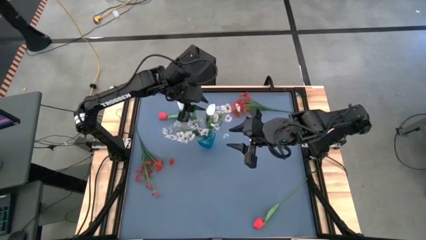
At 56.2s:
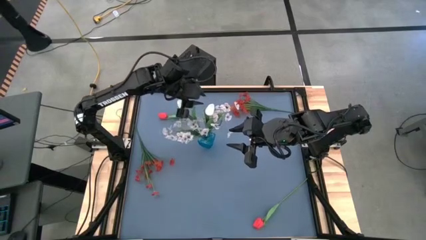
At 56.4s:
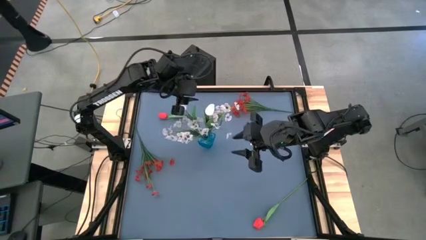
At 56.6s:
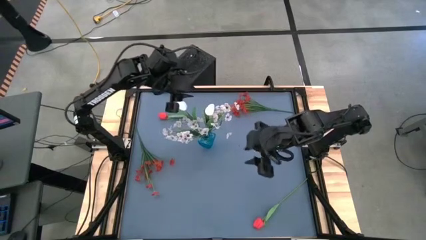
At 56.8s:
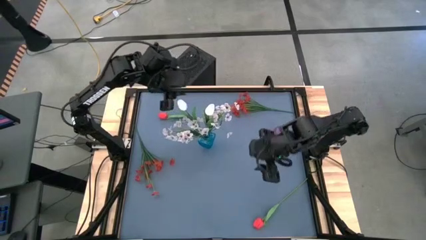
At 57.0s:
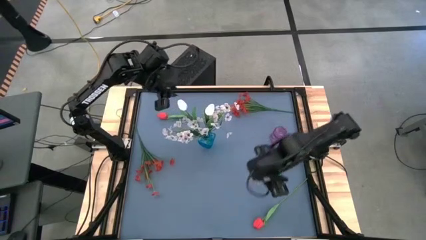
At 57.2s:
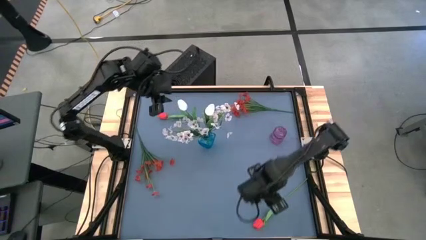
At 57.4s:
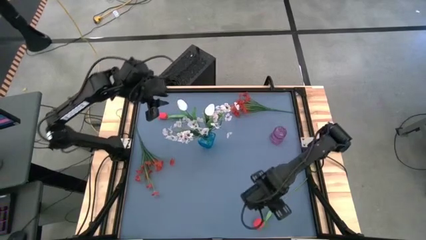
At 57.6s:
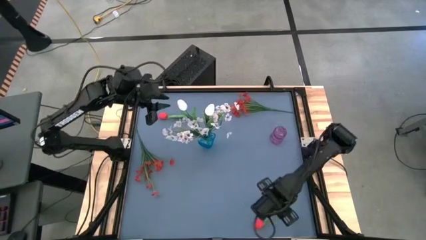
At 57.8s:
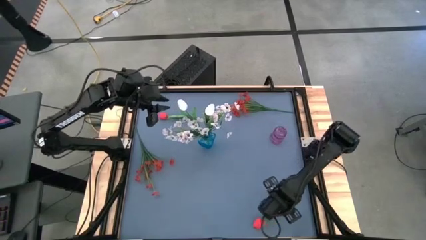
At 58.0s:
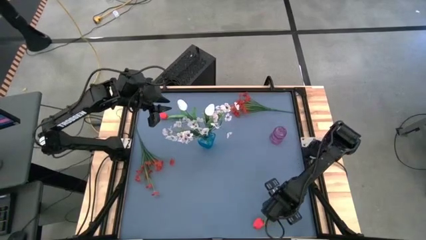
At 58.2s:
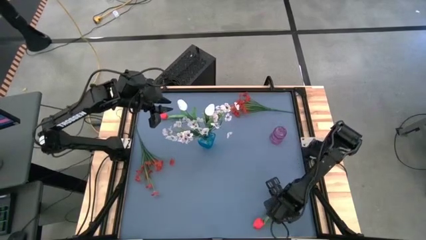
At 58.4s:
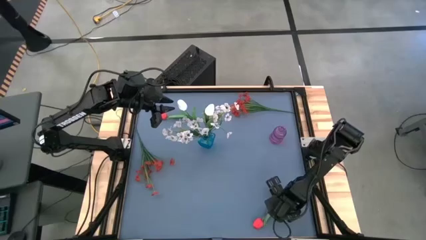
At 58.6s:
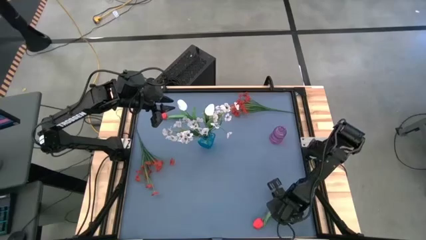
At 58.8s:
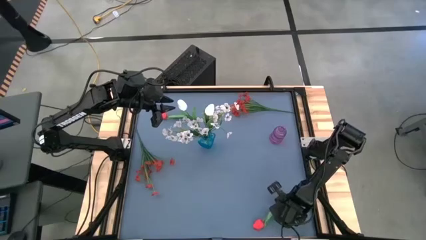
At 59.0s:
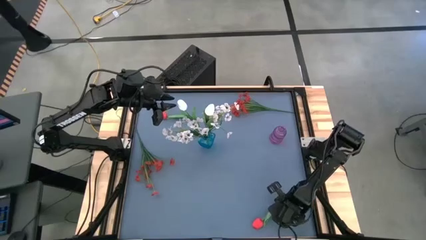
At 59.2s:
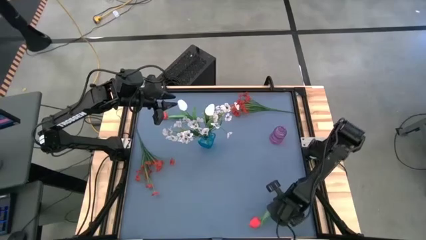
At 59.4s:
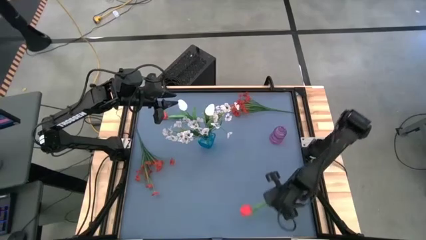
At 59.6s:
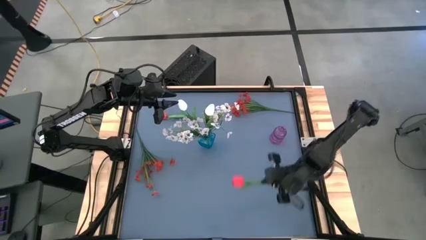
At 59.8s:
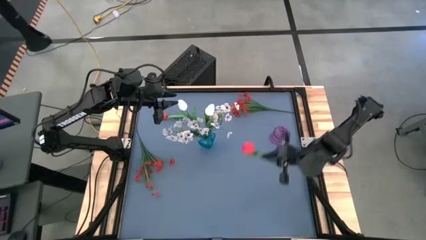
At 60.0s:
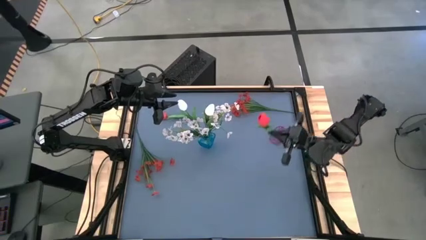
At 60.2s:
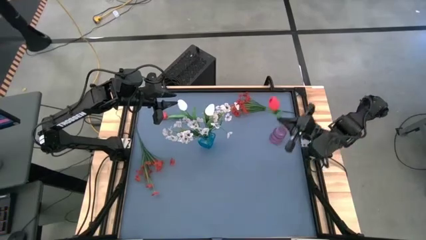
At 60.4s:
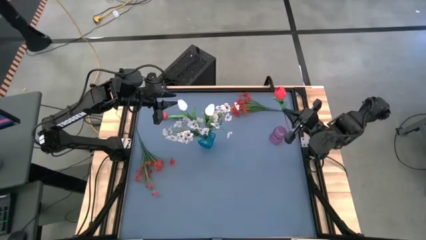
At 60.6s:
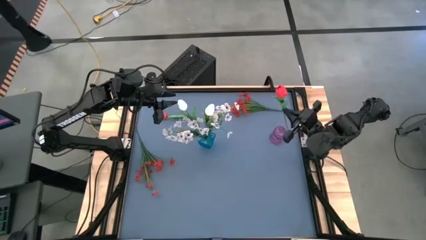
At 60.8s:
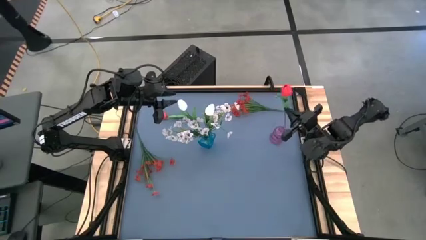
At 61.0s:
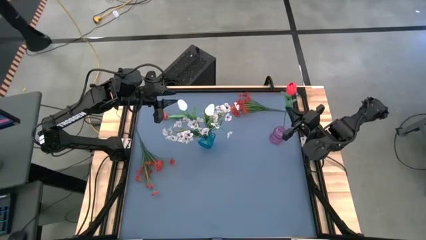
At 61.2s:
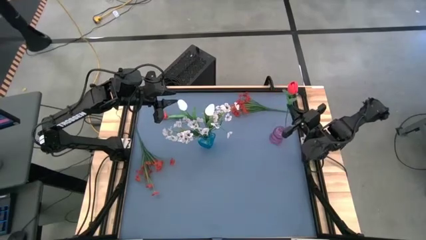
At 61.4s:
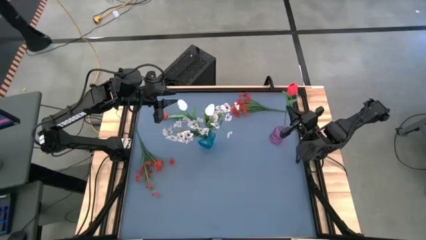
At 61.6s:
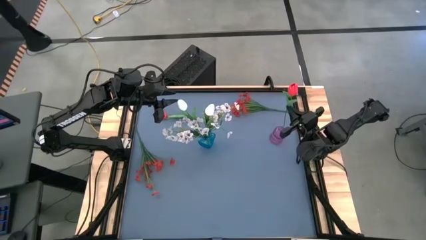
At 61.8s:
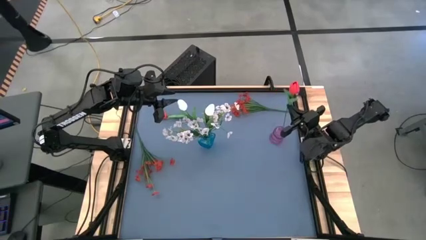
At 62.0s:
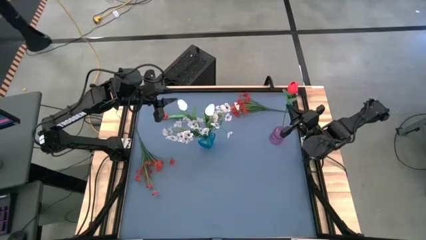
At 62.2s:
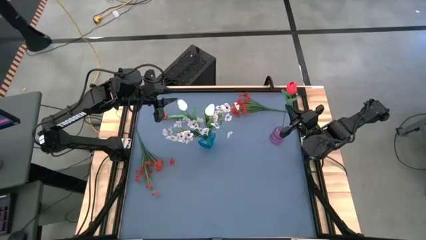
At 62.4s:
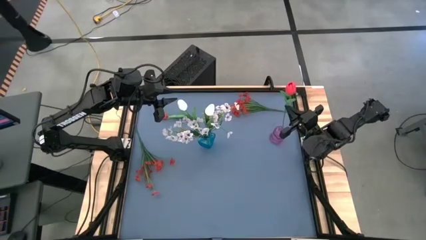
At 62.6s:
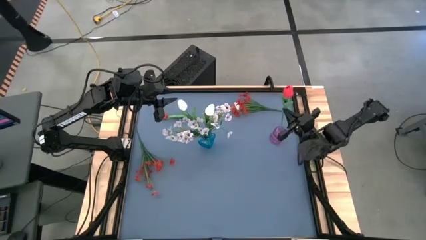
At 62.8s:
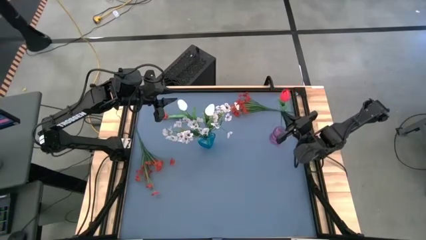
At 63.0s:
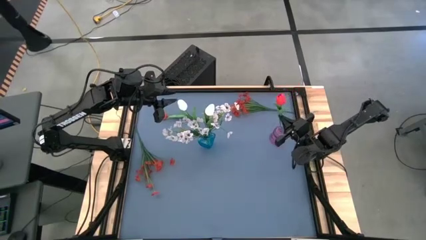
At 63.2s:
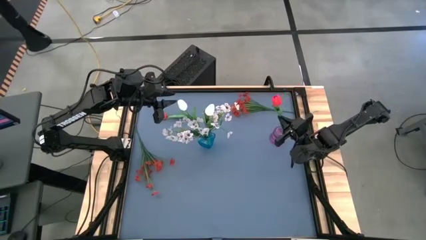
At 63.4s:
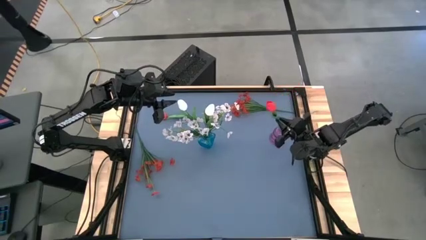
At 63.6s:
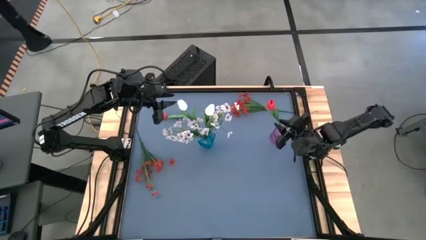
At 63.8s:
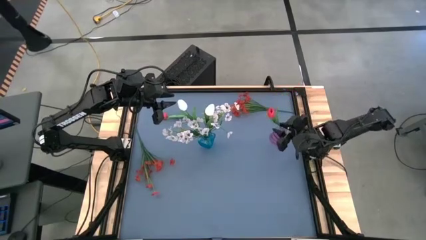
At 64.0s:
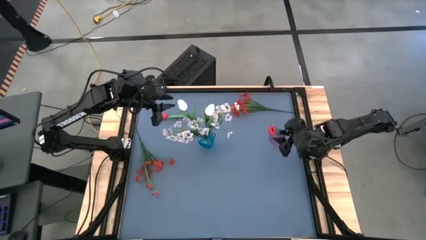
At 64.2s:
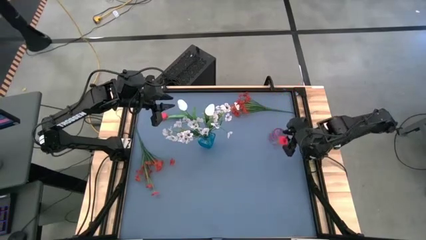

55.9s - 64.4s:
Task: Sort flowers into vase by color
Put the bottom red flower into the violet vase

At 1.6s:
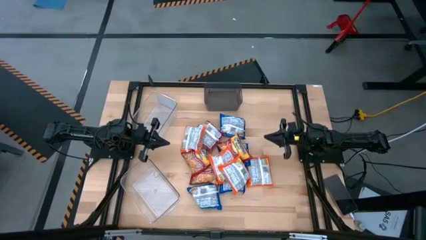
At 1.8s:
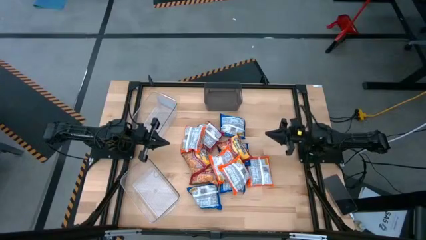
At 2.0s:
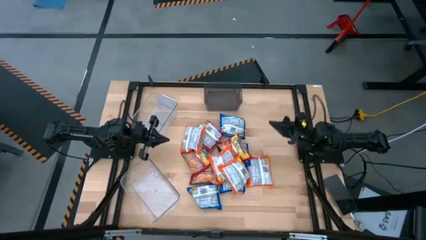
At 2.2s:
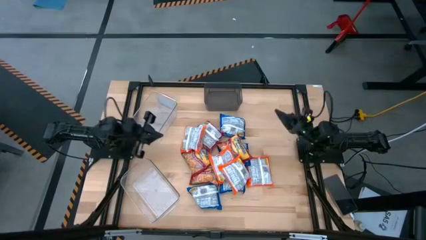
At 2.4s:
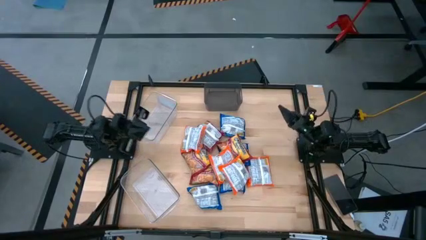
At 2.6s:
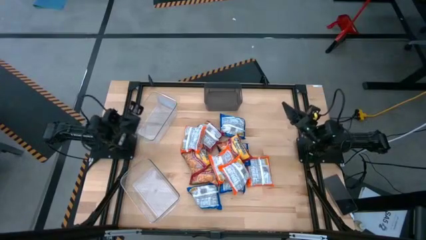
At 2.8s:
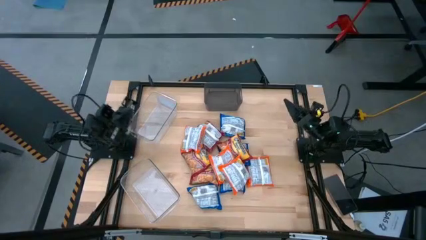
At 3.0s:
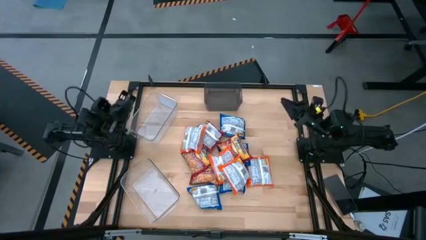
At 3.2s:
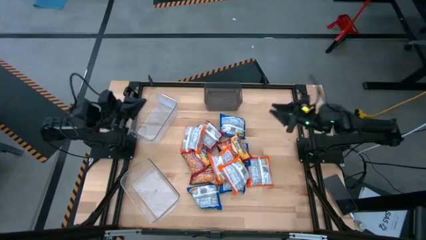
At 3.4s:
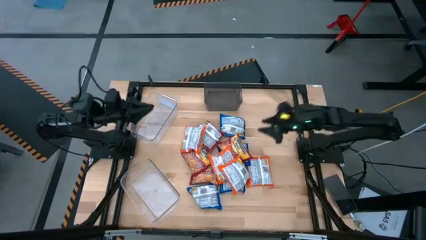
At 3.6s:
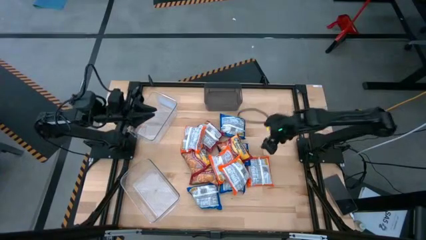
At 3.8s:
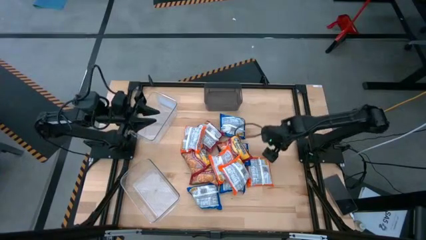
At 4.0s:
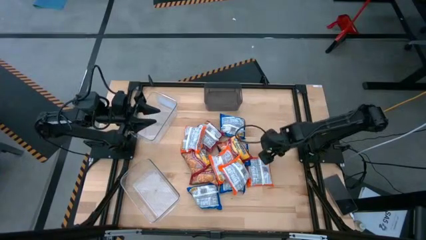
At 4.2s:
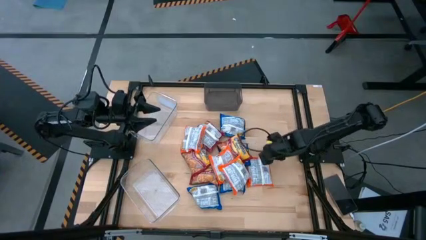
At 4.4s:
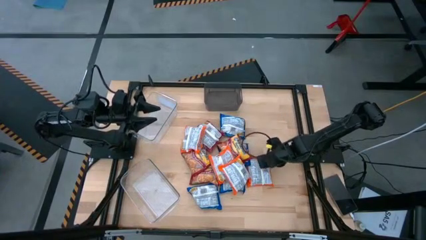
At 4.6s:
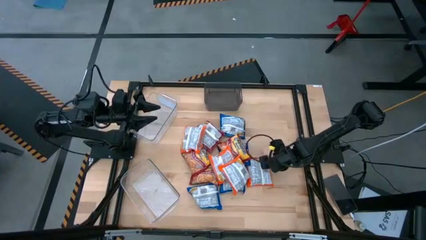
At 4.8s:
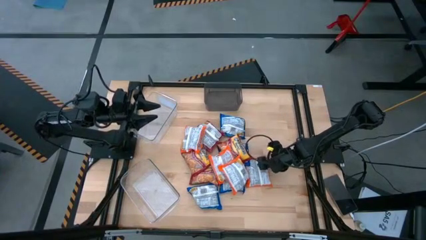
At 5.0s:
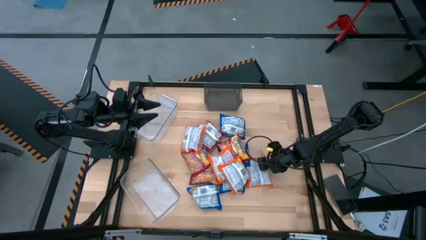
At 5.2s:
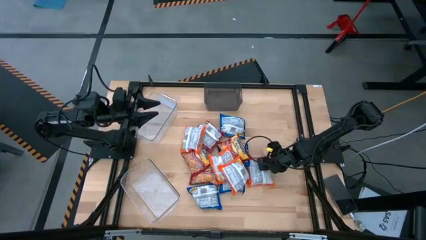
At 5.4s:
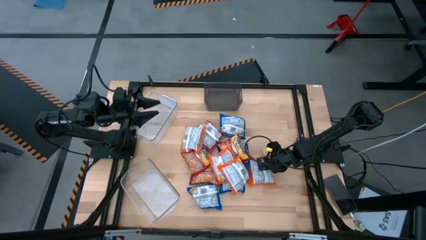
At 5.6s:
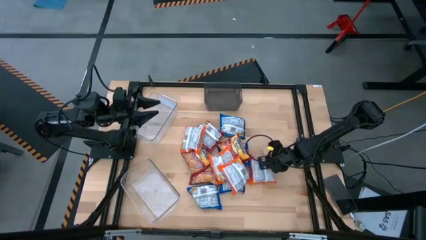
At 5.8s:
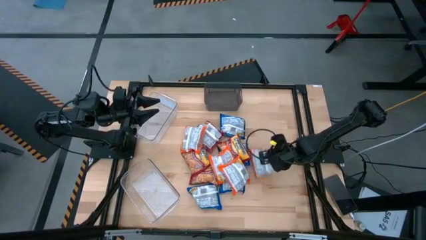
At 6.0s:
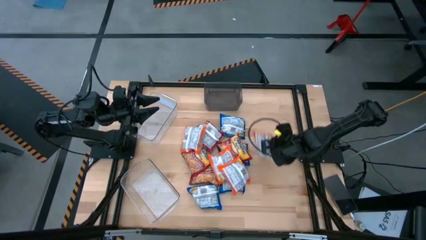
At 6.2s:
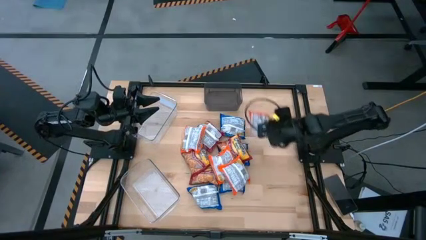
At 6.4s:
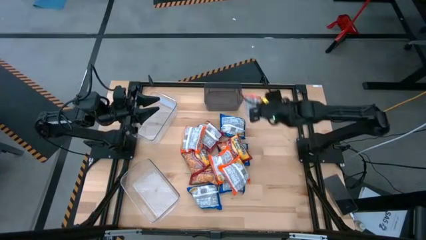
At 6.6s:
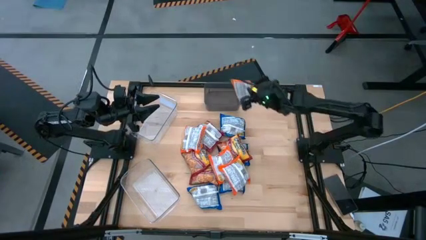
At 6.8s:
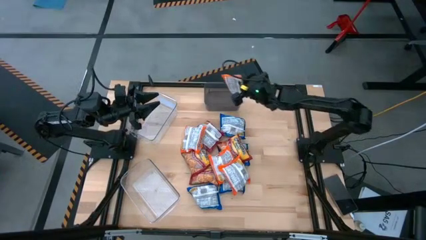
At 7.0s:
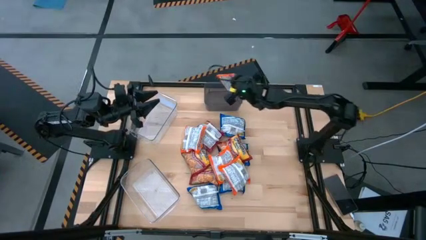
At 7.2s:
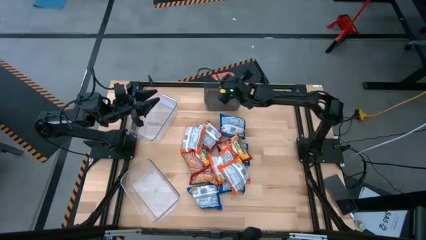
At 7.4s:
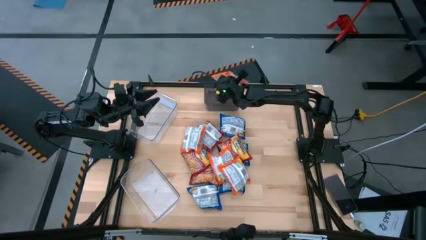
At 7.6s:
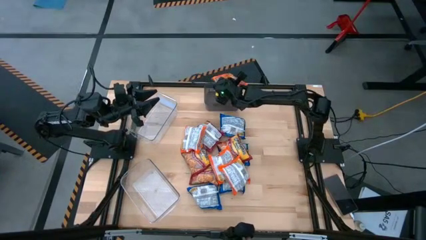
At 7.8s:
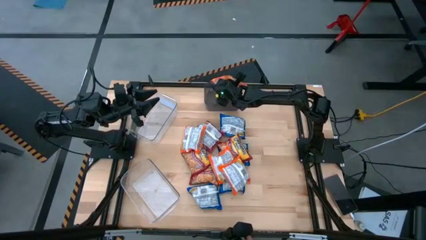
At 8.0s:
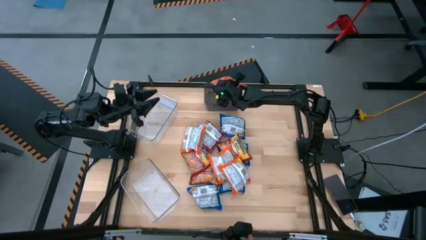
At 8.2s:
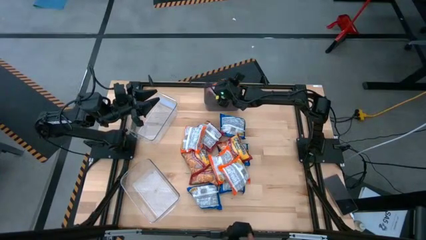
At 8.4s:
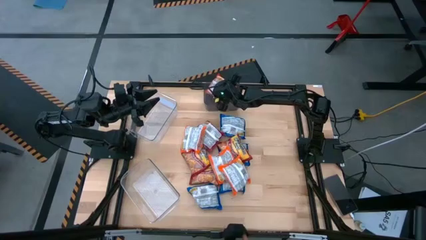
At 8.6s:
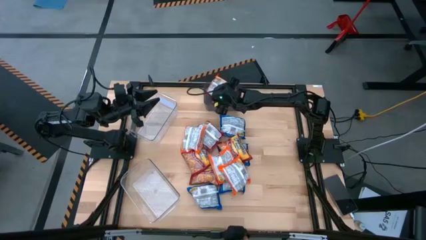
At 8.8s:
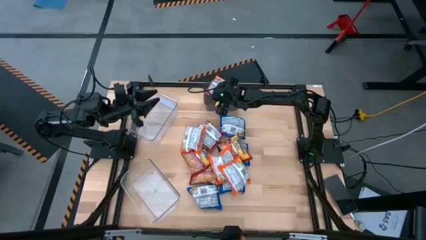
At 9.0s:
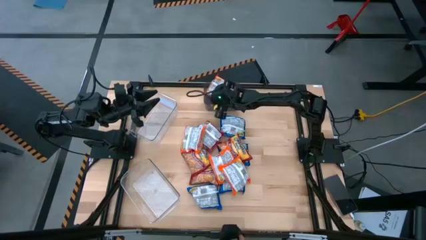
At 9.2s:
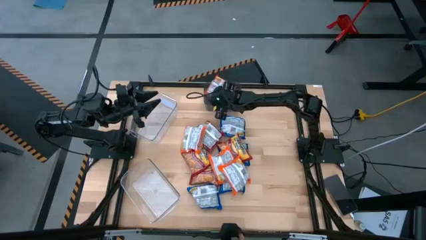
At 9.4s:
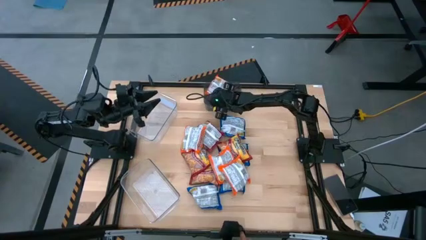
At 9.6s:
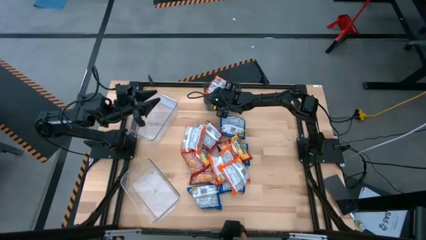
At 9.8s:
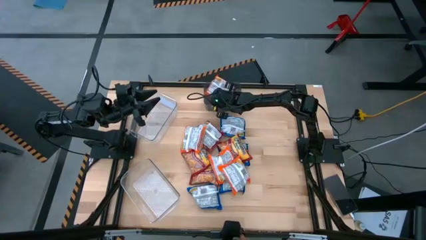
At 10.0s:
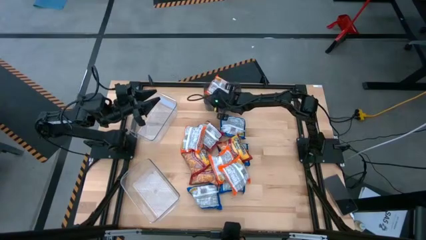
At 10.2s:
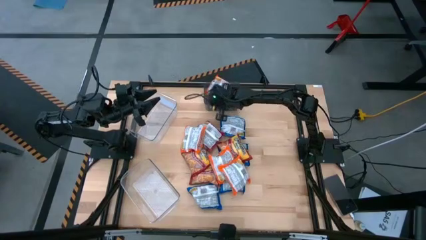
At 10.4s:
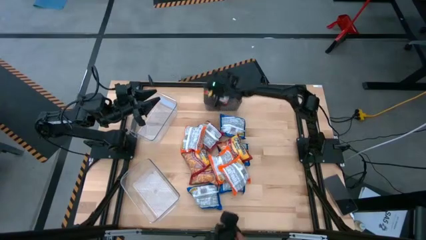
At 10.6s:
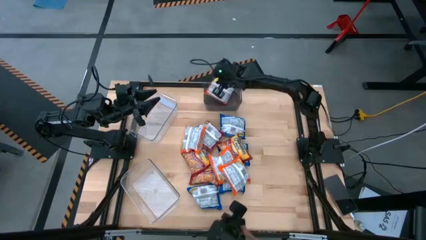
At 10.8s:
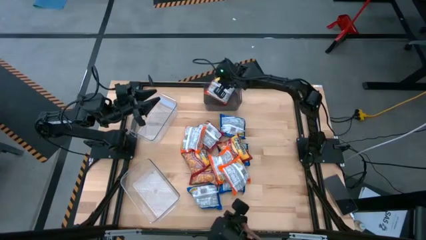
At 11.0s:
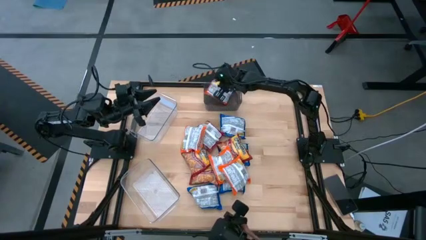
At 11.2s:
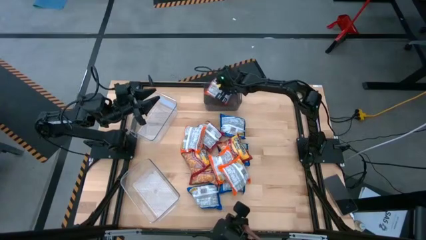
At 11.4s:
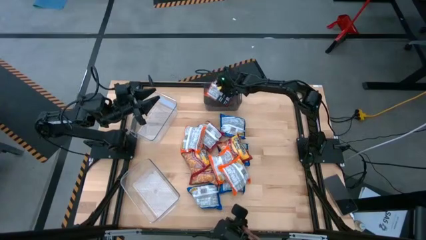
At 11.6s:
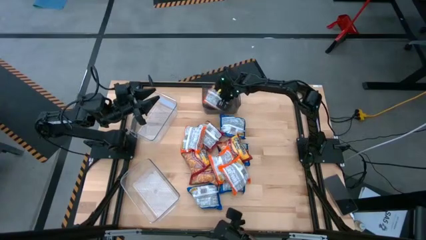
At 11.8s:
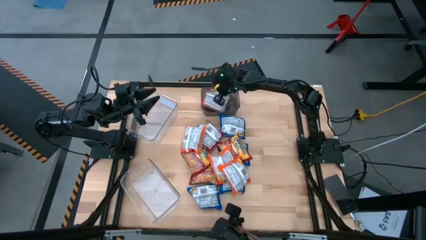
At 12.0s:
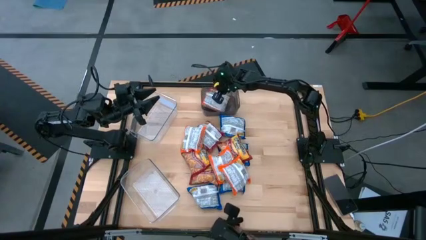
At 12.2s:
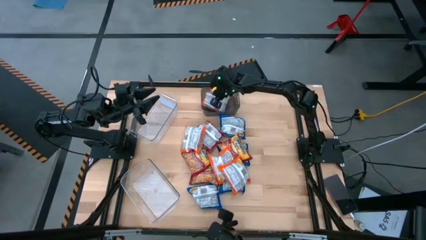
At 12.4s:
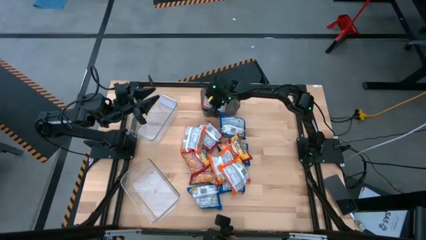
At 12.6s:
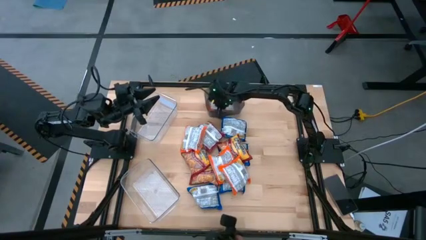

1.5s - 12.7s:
Task: Sort Maruchan noodles
Put the orange noodle pack into the black bin
